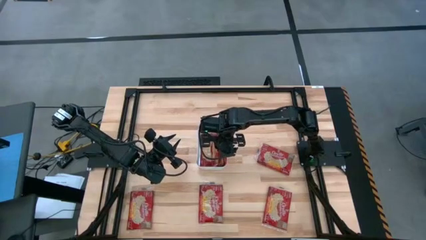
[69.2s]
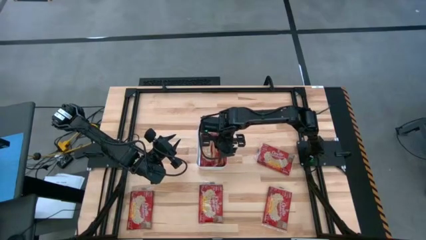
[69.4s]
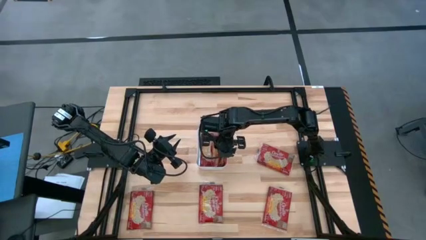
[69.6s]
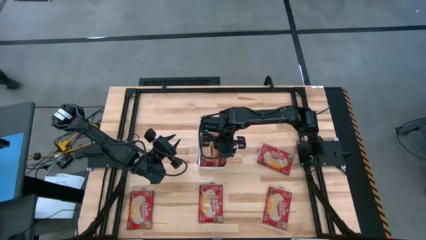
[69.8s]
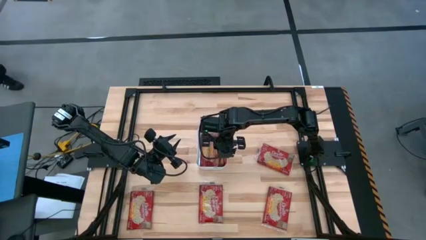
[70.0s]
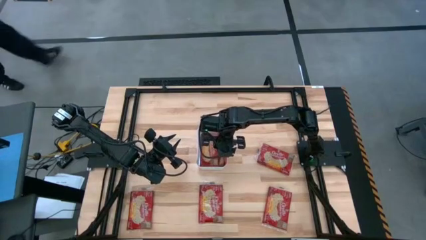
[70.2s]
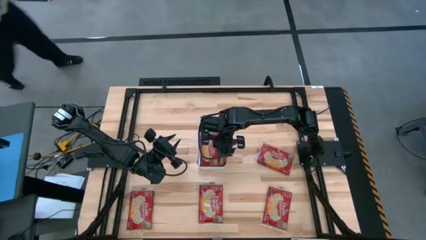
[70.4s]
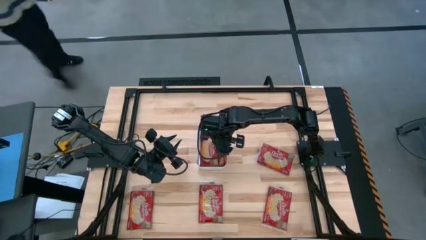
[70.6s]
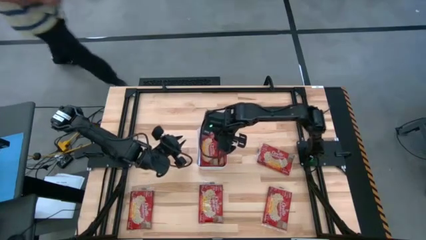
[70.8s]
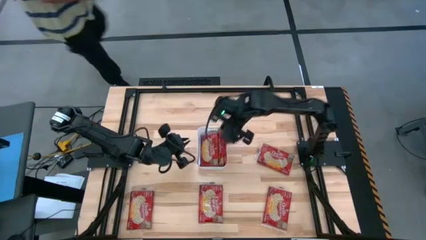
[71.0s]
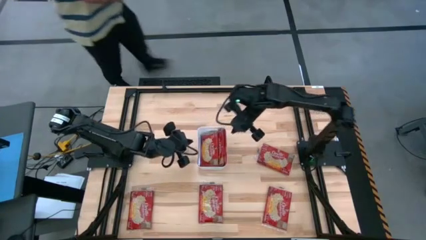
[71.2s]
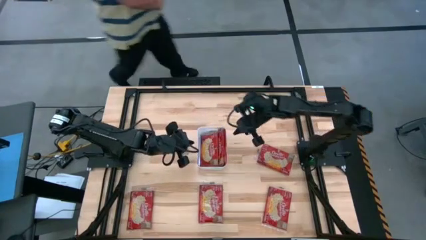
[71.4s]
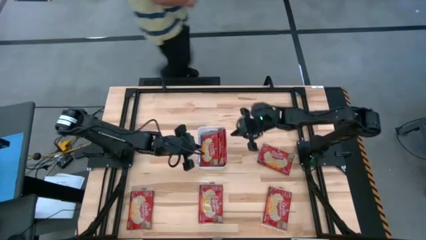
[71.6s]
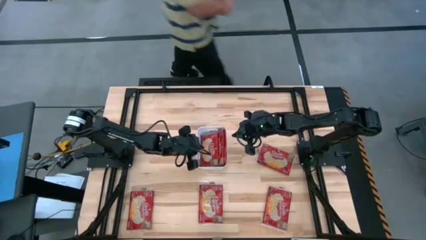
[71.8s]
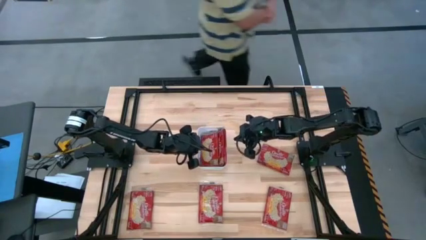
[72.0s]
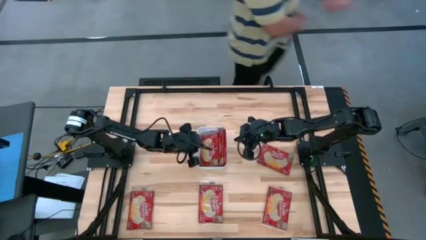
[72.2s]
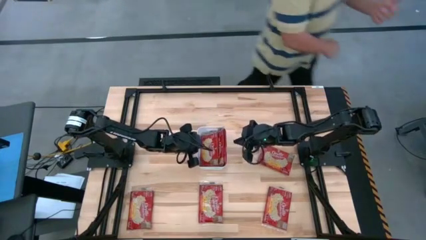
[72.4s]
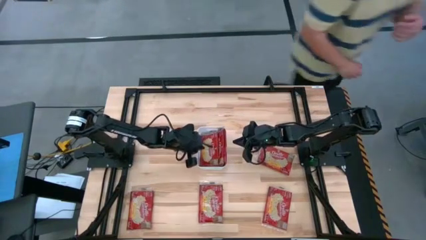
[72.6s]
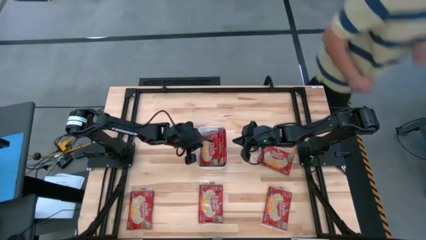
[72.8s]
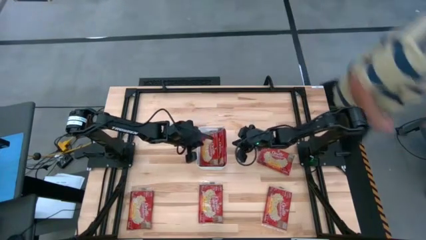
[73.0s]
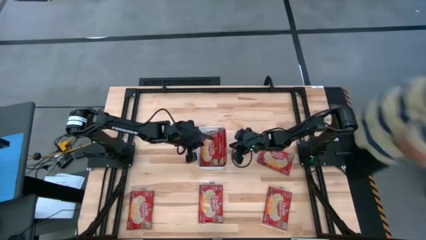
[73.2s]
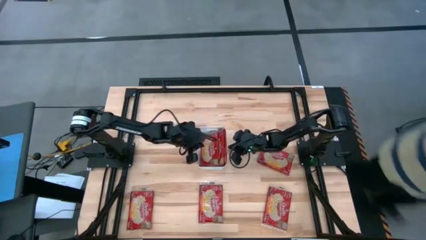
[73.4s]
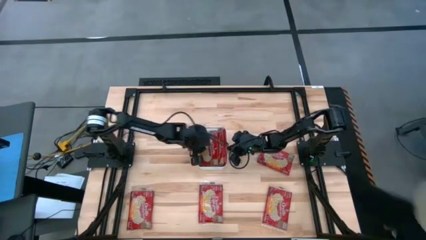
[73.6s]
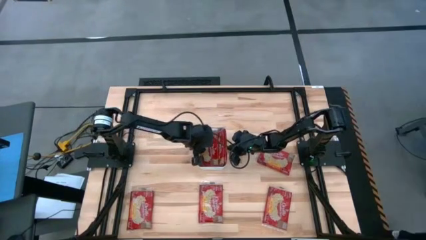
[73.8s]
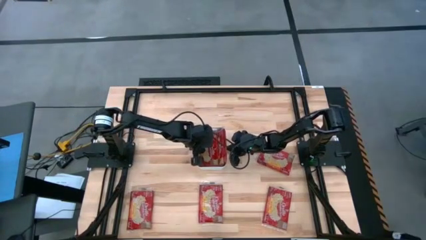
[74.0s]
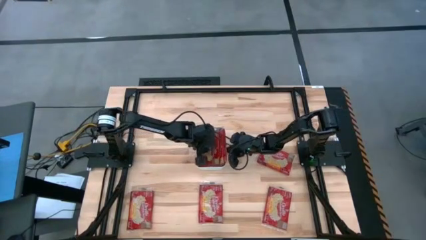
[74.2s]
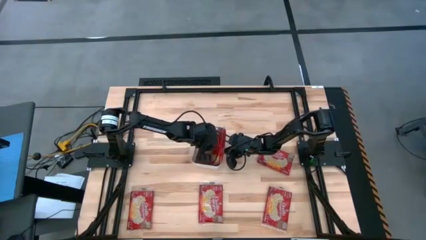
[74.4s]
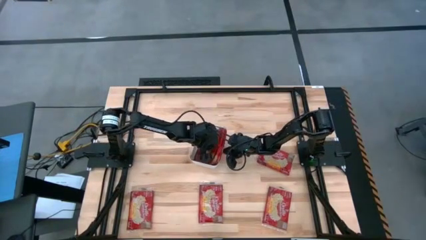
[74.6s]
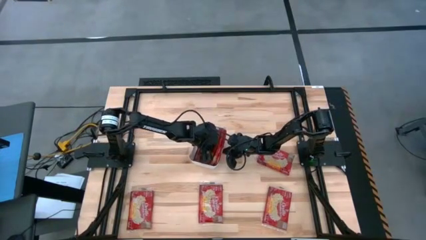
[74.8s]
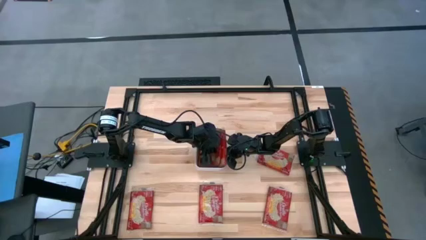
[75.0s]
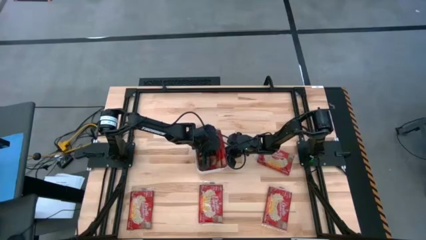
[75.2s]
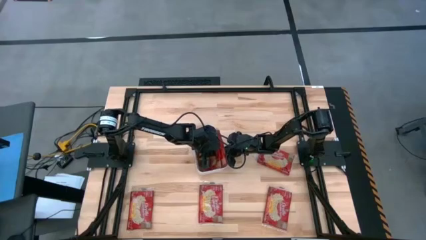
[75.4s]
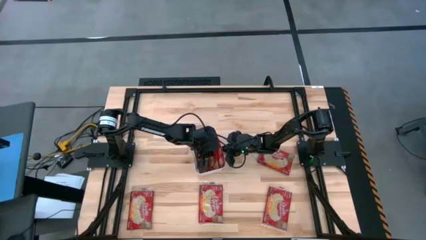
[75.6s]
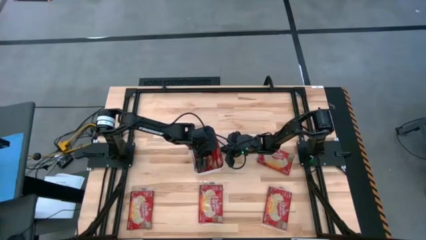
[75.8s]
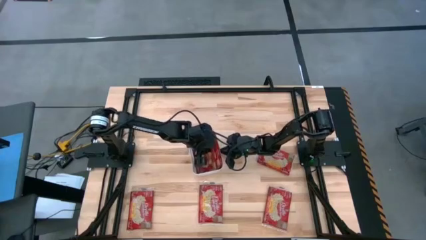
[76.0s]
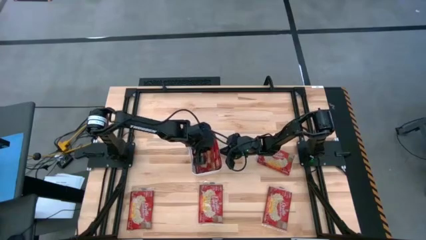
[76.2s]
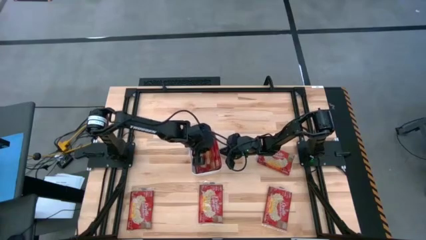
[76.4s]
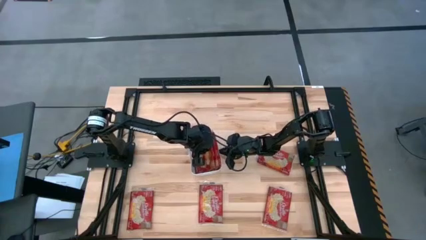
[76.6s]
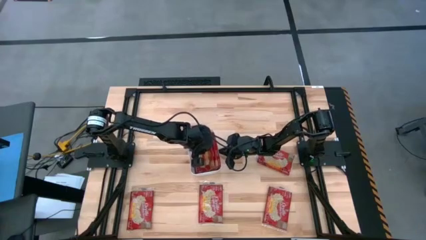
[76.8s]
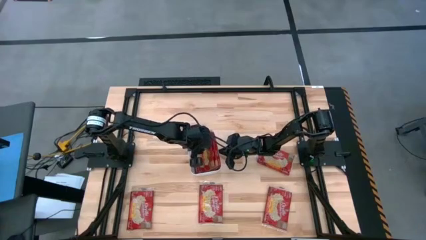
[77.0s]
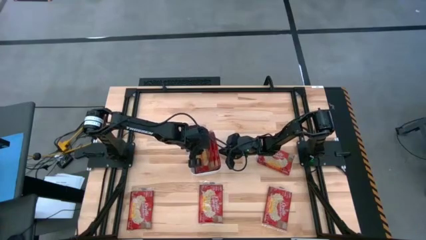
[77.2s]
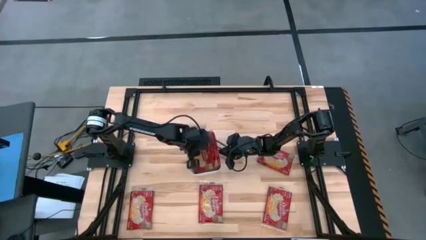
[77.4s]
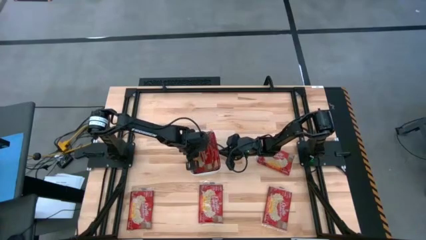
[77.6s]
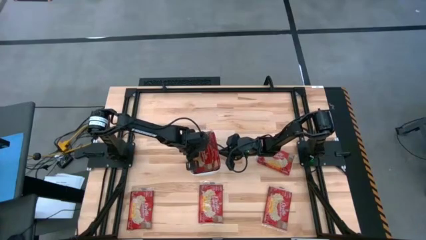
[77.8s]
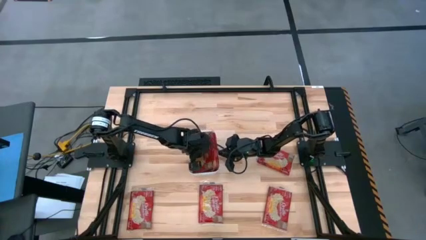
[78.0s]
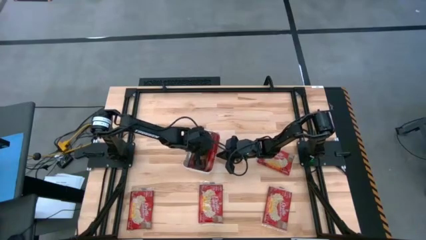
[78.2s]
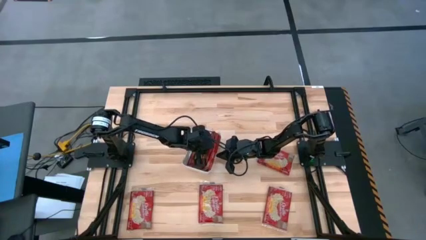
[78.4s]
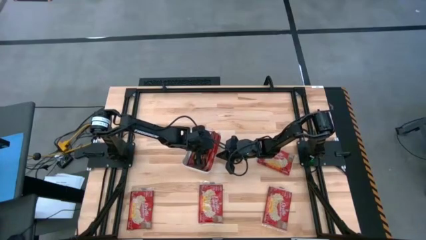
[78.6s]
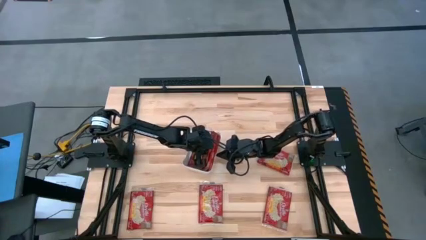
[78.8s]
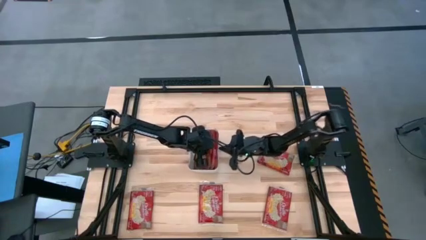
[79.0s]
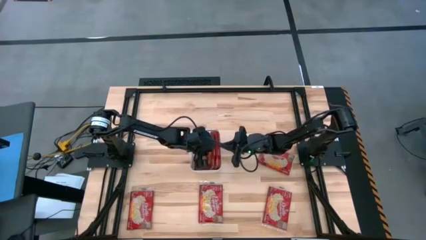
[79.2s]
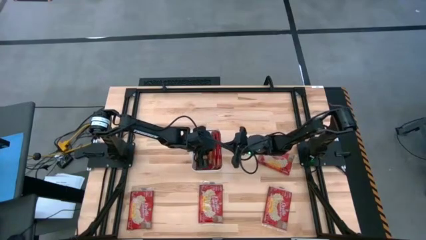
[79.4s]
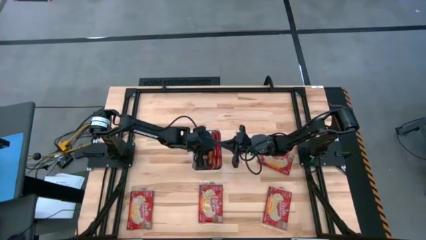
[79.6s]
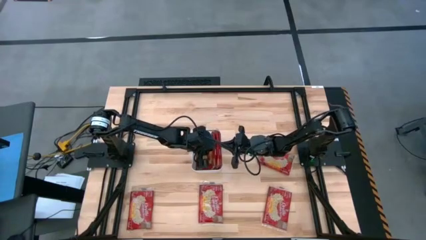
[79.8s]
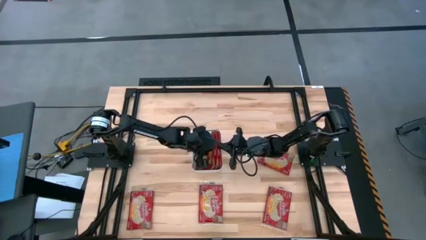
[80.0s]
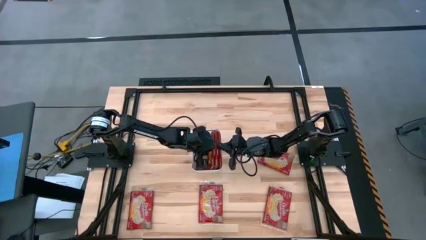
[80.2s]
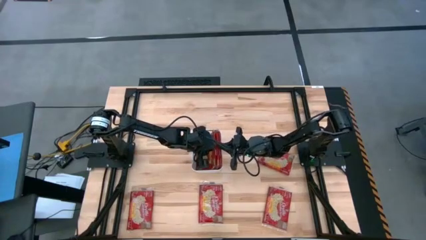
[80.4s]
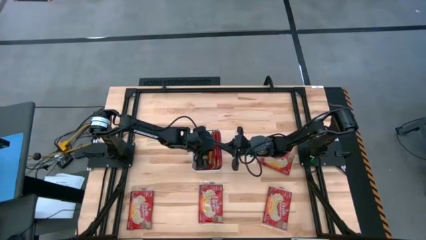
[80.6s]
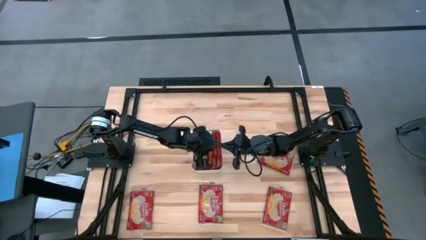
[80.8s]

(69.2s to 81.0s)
Task: Sort popcorn bags into baskets
Put the red popcorn bag into the white bin

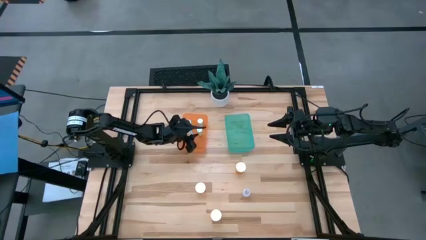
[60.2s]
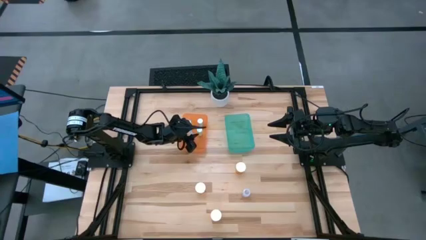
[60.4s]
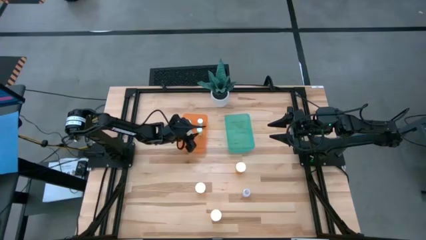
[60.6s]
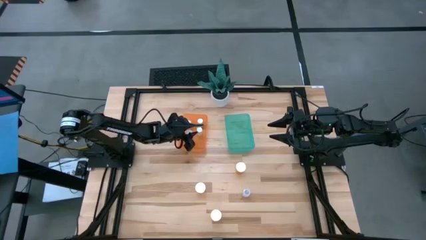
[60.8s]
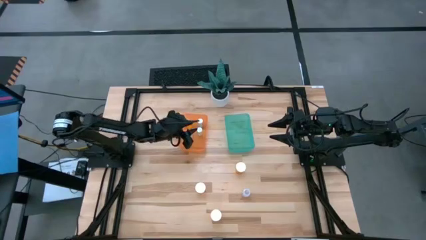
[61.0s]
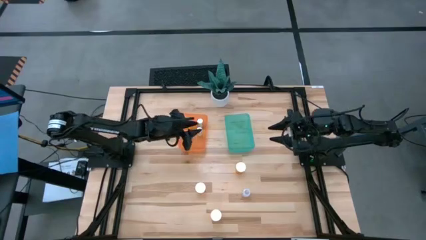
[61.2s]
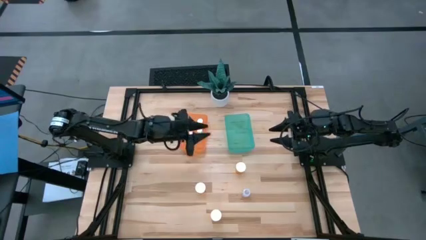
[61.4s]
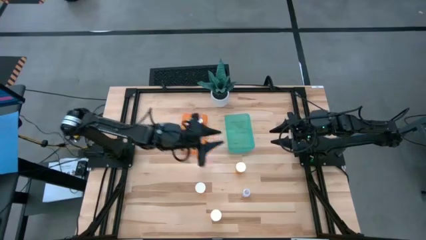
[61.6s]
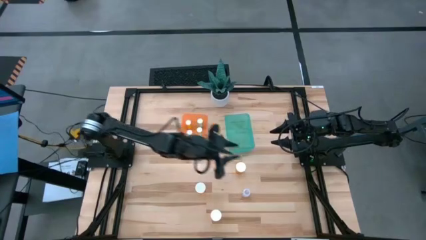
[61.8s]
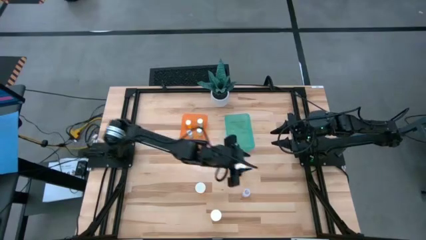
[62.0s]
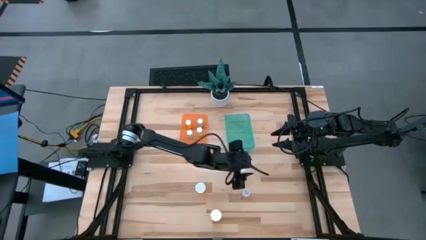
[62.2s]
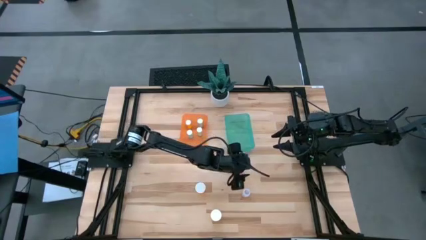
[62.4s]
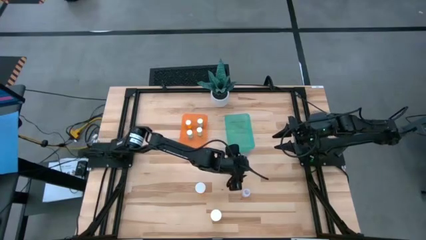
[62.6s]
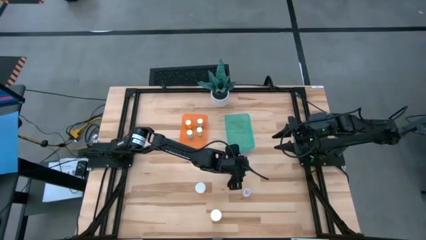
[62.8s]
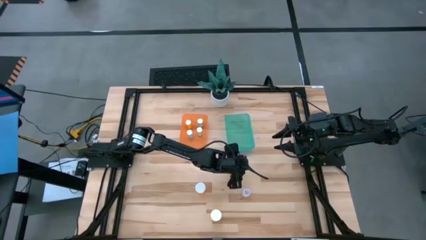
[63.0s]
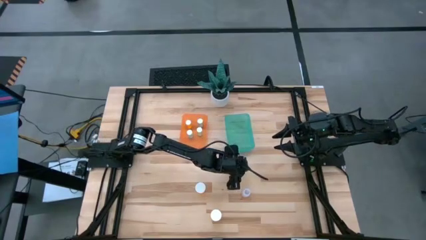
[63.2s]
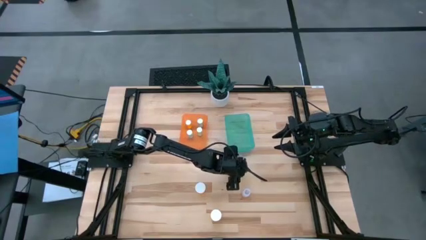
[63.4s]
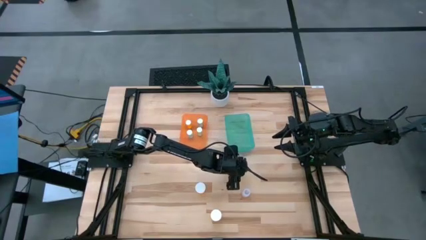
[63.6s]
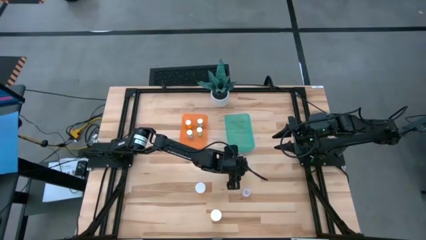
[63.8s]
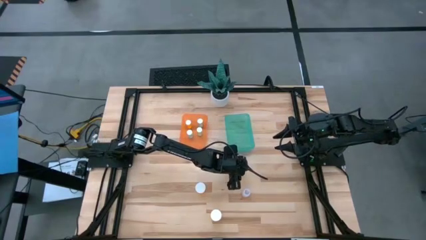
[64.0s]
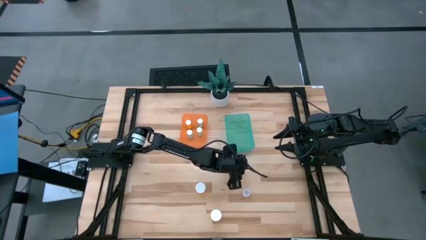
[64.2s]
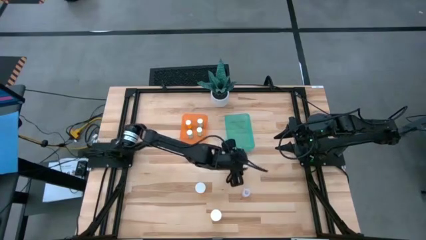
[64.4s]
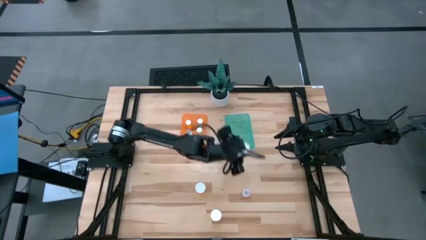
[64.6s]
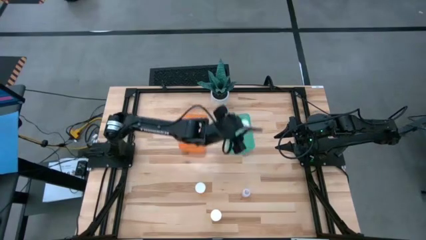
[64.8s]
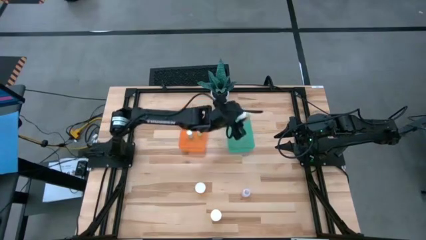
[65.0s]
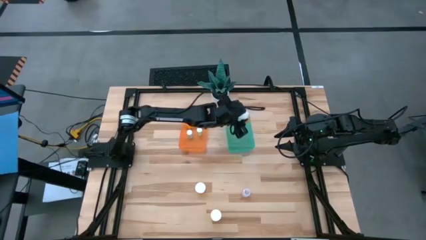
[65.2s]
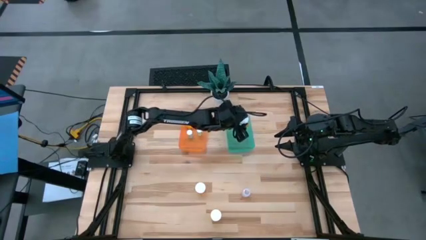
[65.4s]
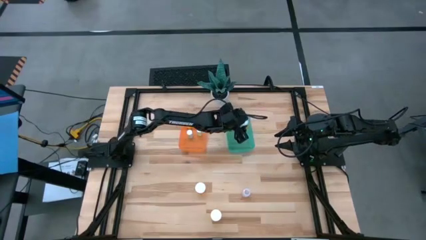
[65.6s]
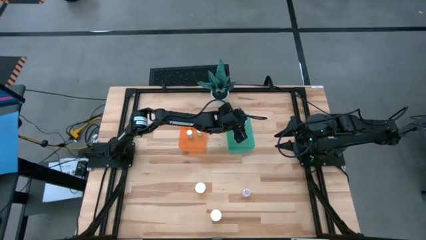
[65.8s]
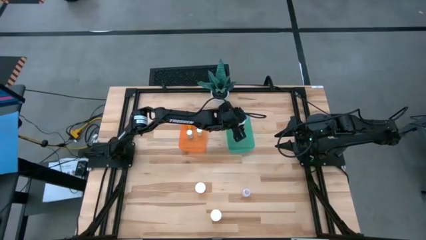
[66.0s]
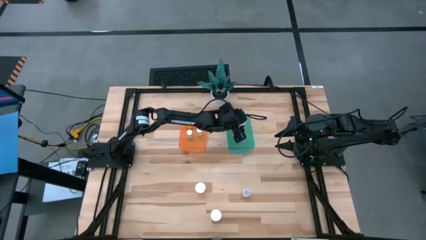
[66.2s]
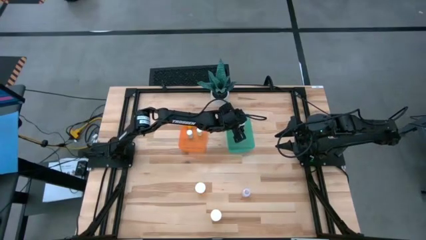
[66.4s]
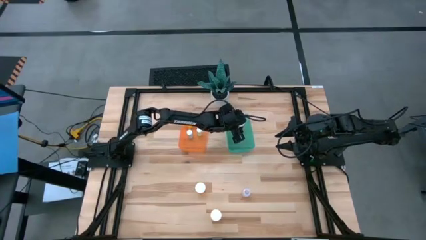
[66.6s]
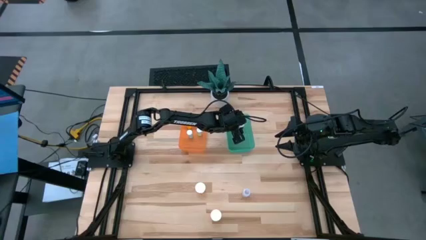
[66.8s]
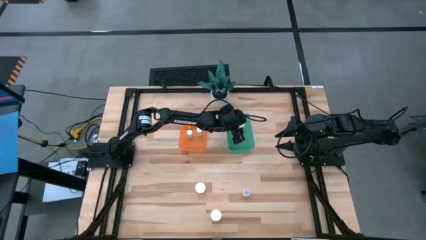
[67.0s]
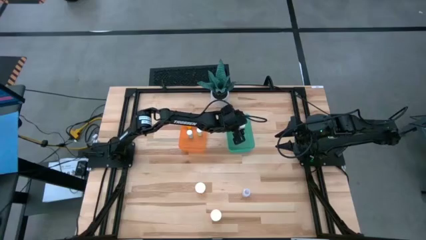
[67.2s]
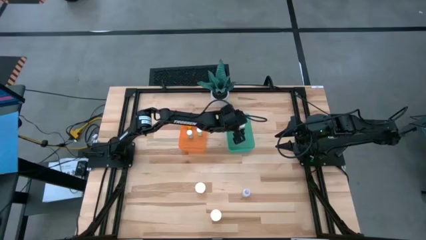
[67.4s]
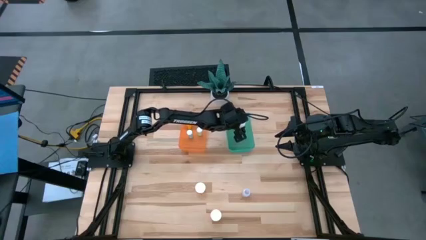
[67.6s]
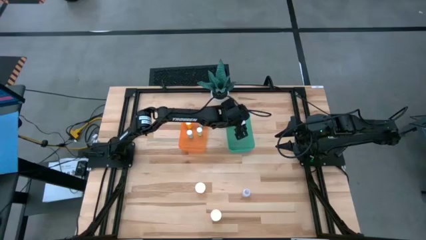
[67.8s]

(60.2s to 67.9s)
Task: Pick and place medicine bottles into bin by pill shape (circle, oval)
Put the top orange pill bottle into the green bin
